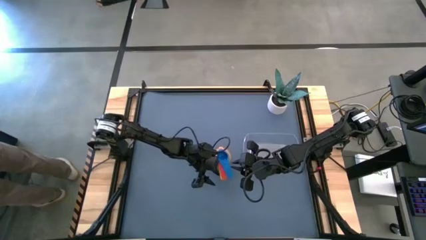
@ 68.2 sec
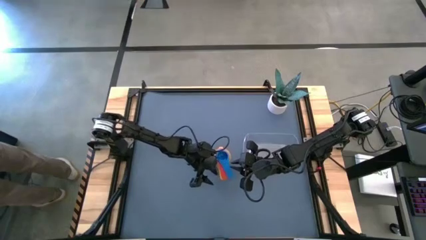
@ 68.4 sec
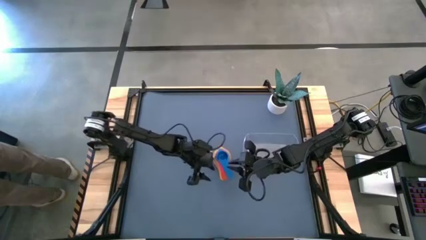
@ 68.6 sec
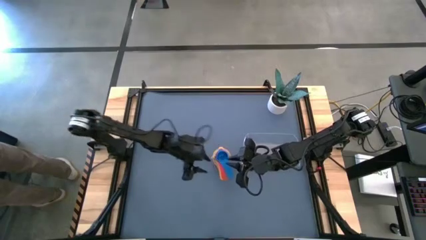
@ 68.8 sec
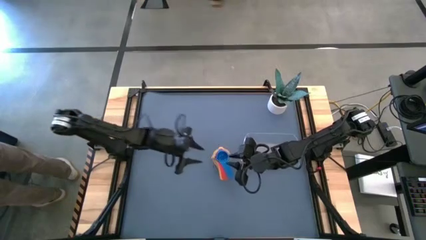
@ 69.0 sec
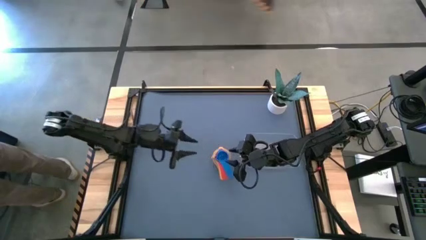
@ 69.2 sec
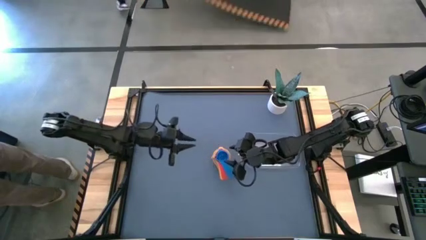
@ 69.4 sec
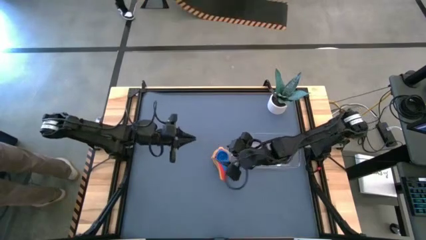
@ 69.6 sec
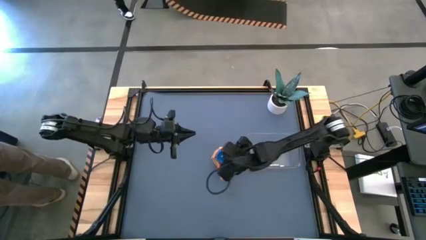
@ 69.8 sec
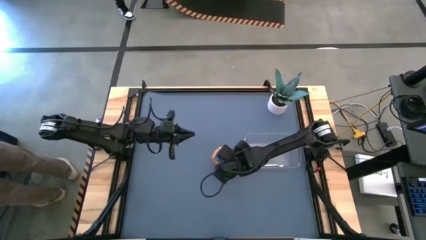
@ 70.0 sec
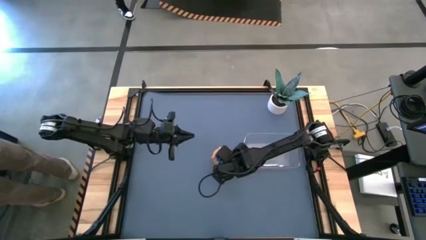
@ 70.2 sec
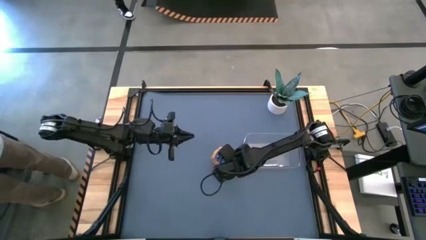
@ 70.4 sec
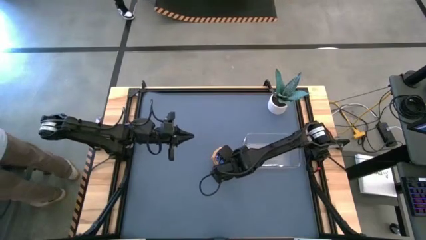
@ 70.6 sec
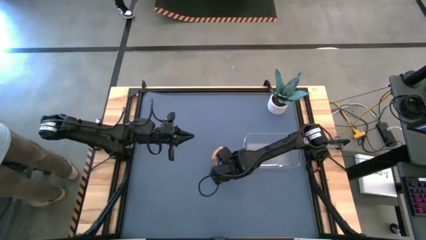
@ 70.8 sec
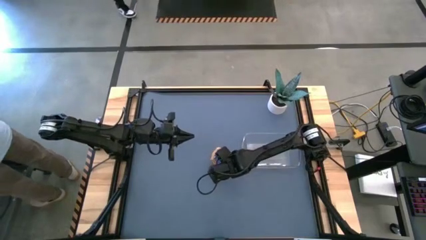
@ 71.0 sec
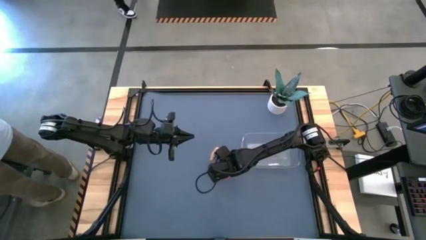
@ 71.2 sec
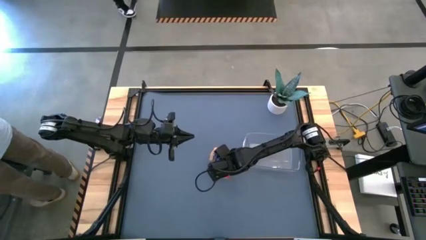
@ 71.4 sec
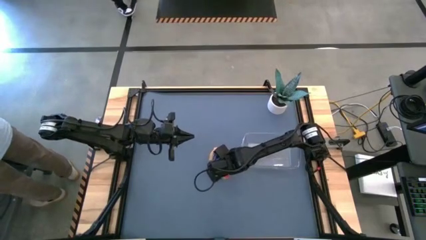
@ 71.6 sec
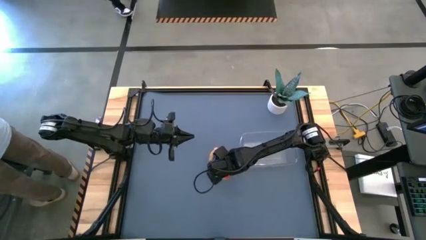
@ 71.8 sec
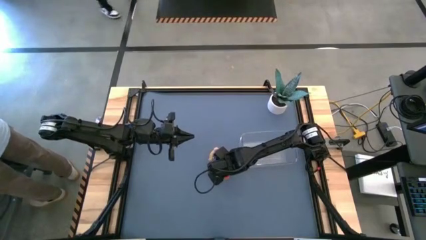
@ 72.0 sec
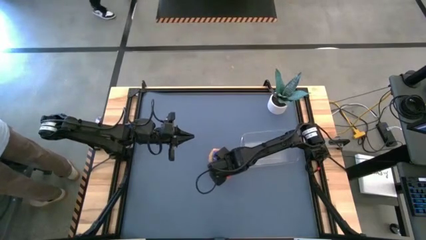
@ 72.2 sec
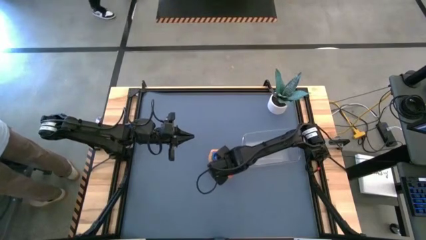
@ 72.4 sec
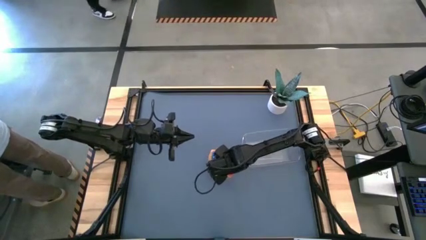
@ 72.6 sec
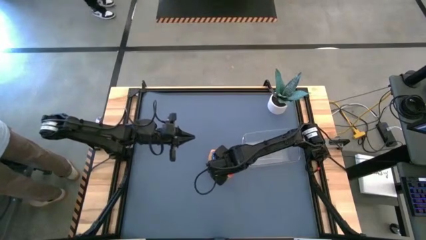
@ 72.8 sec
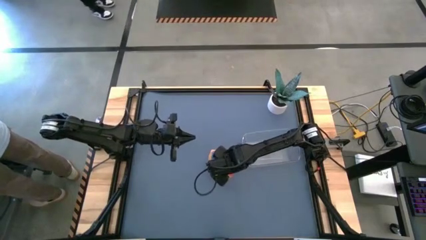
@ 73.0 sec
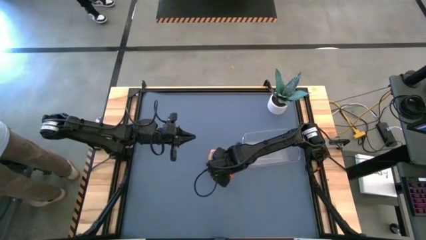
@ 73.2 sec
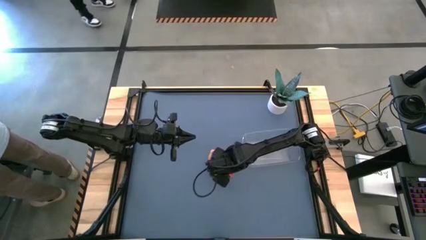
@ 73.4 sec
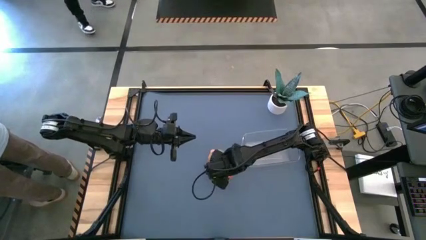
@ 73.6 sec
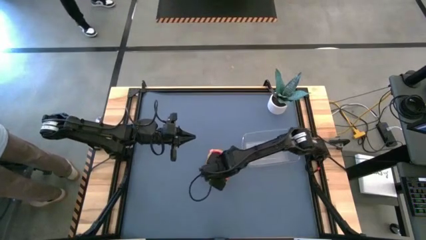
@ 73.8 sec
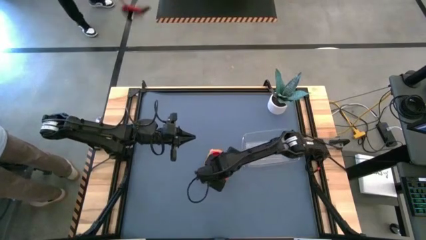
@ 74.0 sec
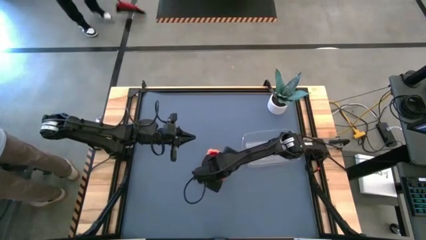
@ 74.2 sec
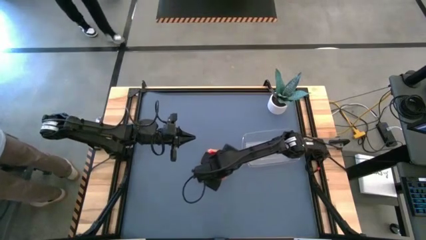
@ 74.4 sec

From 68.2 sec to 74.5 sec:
Task: Nest measuring cups in basket
Put the stacked measuring cups into the transparent bin

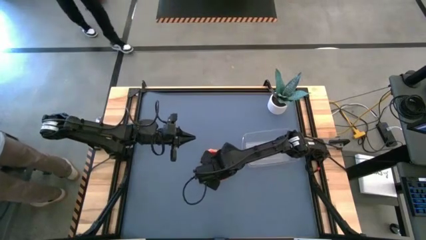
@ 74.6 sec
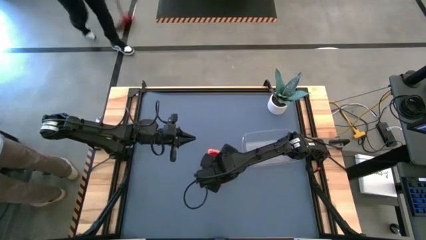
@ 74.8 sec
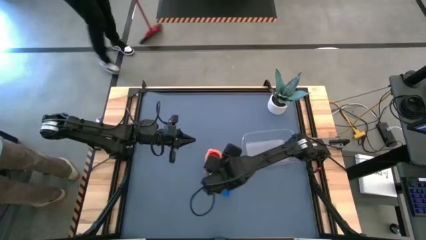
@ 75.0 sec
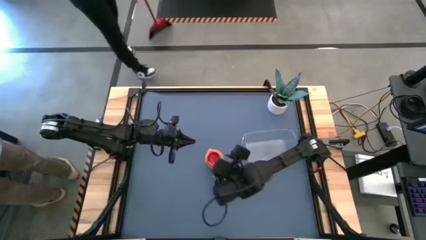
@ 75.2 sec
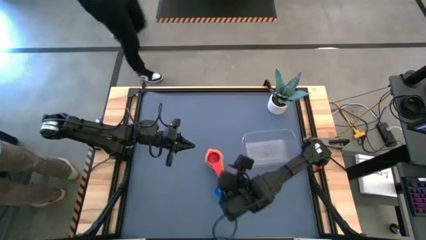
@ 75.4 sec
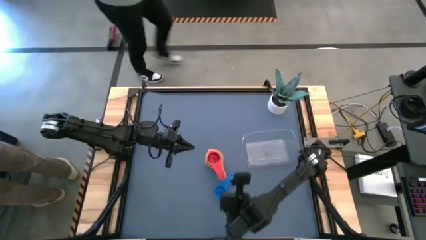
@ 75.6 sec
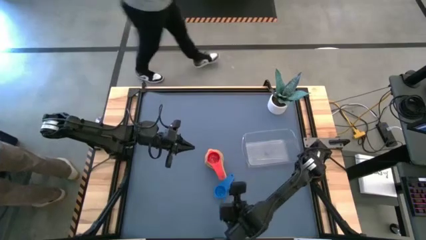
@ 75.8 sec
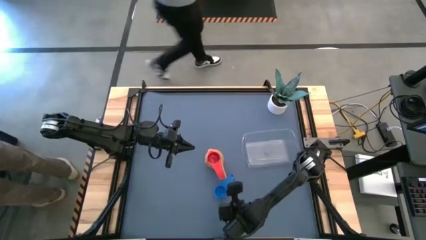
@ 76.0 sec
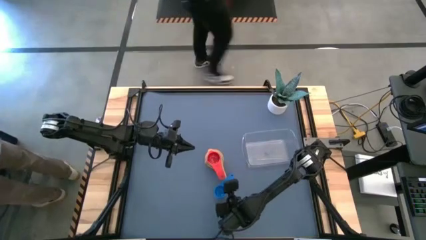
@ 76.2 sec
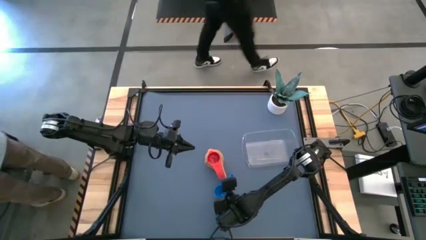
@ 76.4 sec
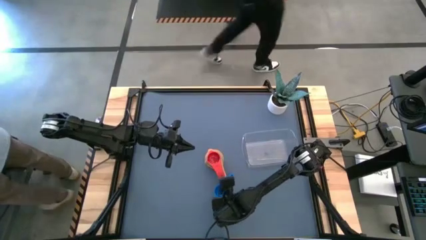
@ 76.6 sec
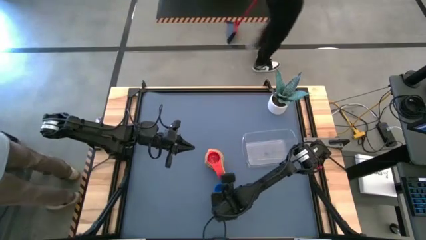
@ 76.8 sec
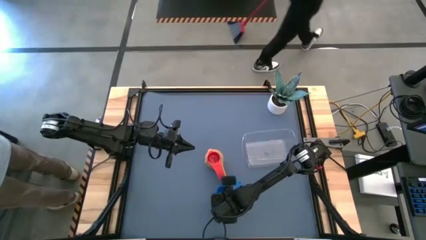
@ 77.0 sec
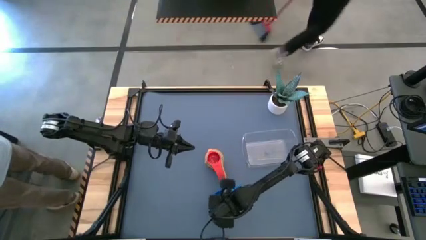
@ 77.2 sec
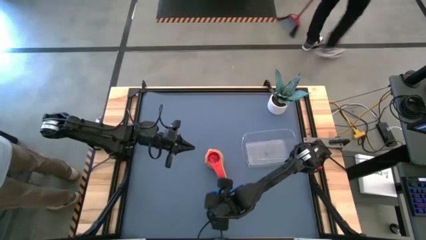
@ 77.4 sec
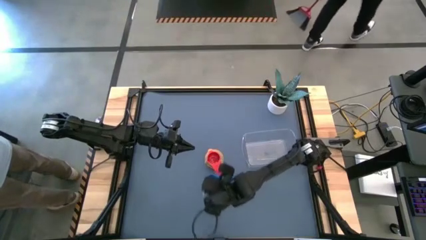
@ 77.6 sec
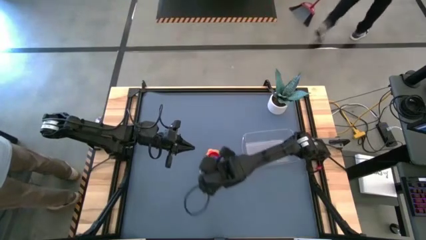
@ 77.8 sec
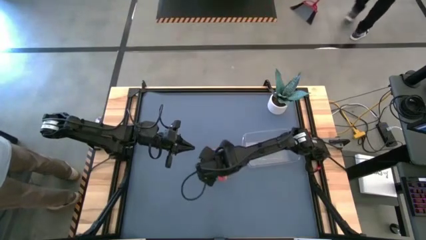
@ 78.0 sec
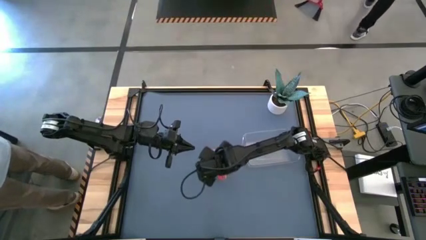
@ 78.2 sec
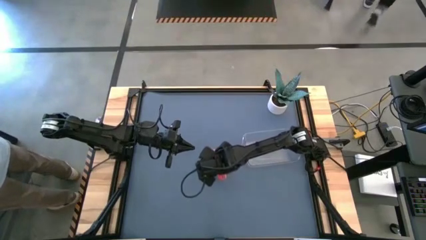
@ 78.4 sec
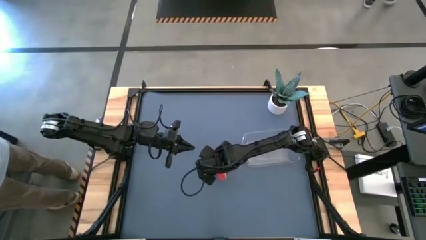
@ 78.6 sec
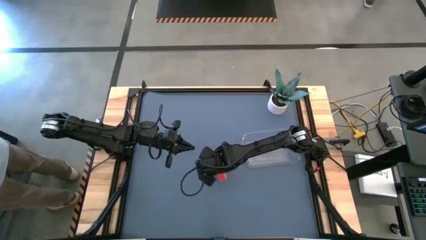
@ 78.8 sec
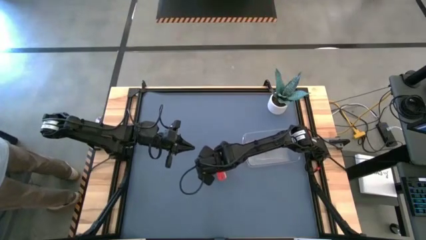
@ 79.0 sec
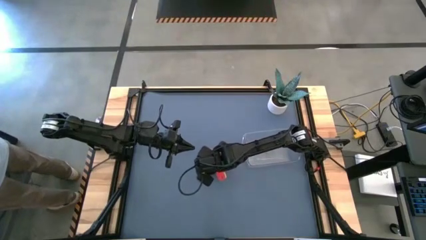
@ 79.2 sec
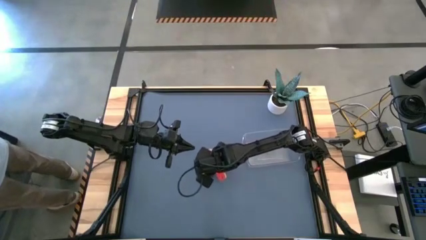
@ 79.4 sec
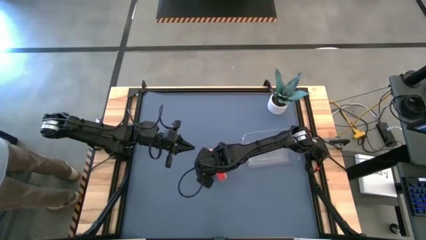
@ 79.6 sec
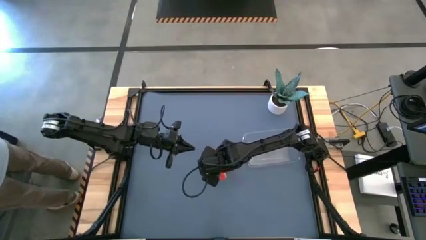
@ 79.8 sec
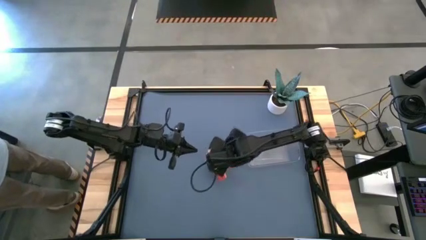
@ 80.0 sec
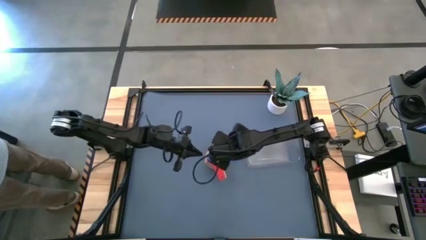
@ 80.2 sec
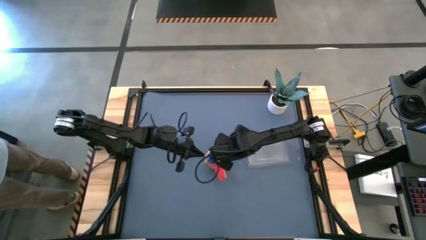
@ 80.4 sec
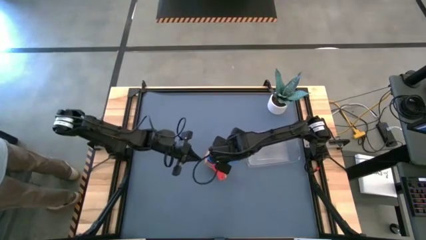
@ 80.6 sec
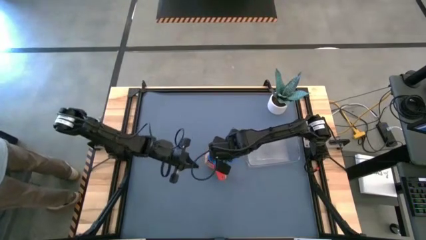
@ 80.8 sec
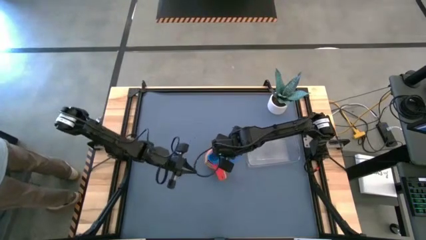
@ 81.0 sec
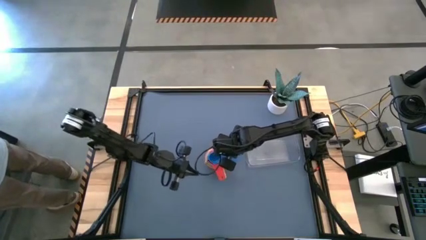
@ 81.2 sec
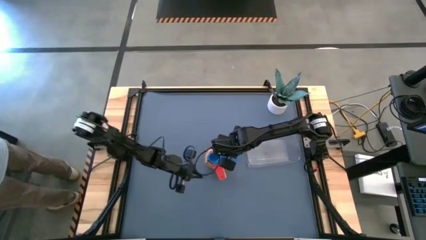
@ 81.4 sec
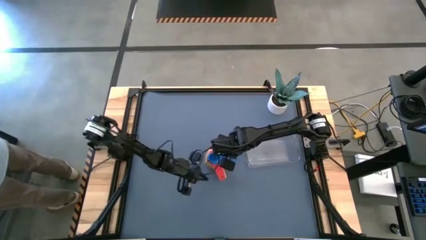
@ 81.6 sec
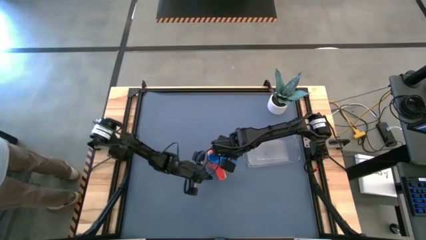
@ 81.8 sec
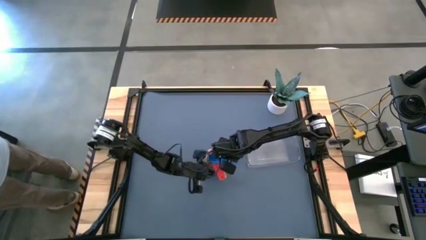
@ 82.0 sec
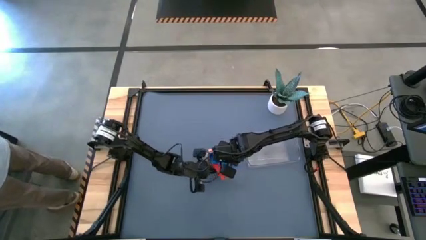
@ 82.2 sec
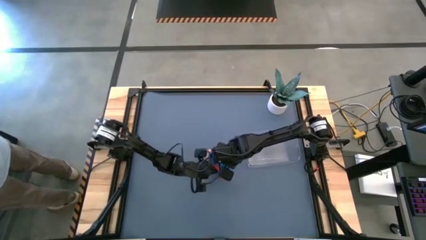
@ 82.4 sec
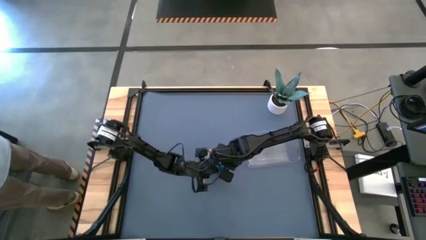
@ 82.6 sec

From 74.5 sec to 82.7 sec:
Stack the blue measuring cup on top of the red measuring cup

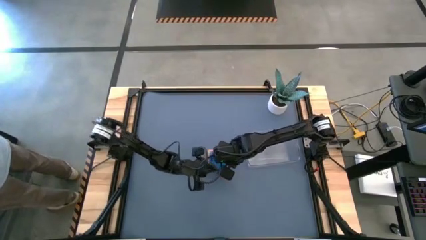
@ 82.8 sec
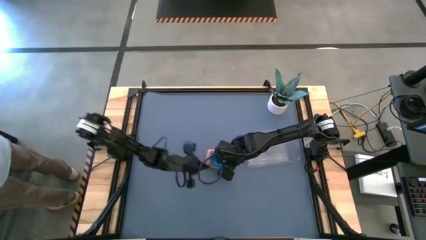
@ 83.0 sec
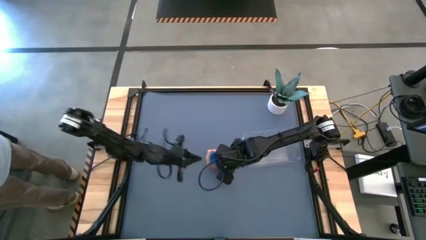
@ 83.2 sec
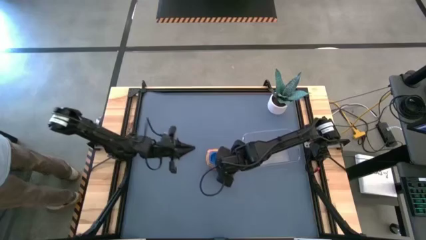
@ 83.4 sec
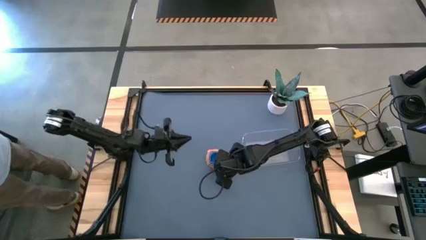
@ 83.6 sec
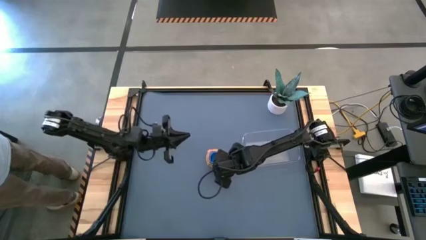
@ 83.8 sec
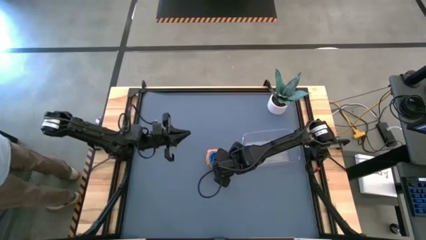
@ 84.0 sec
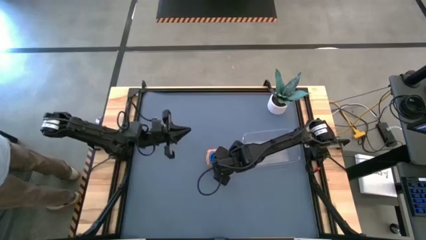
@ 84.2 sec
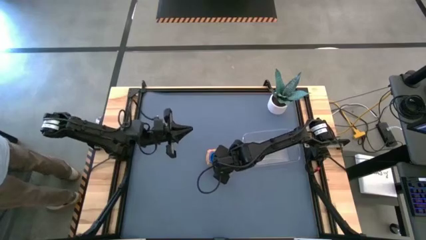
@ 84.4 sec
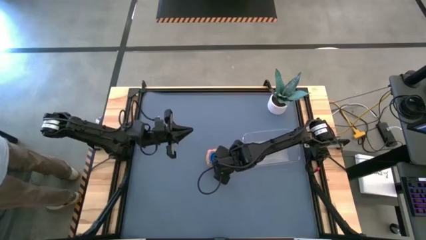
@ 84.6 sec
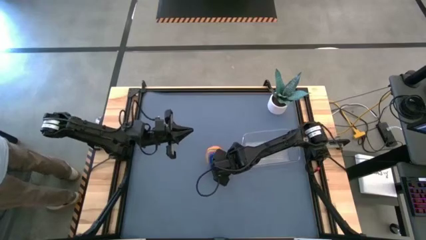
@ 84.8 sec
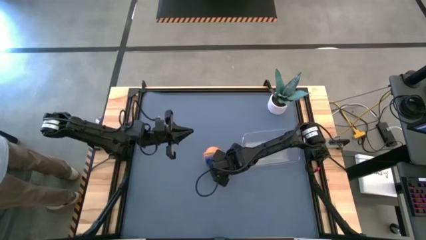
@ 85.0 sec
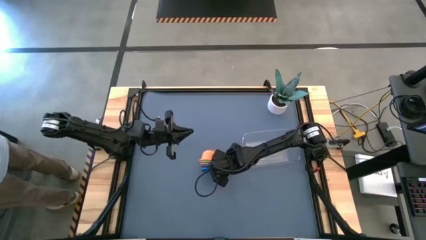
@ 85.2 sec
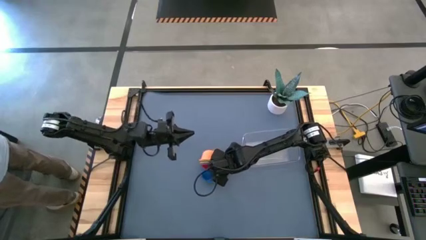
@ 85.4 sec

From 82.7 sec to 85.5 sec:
Put the stacked measuring cups into the transparent bin
